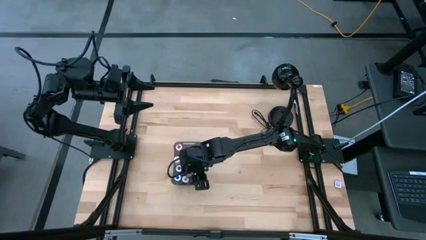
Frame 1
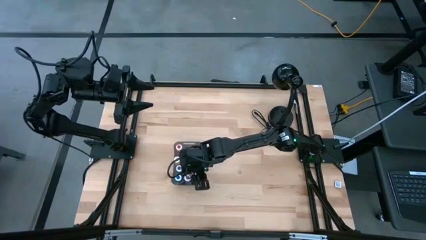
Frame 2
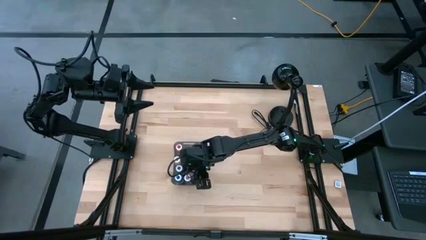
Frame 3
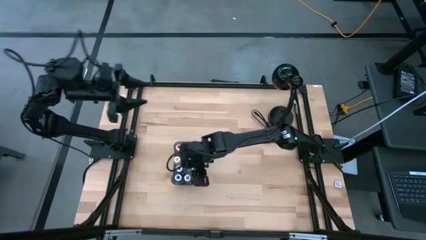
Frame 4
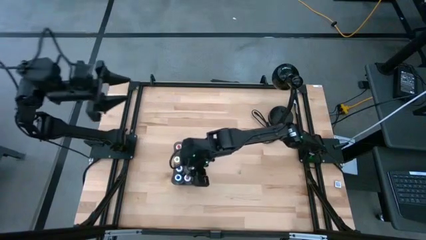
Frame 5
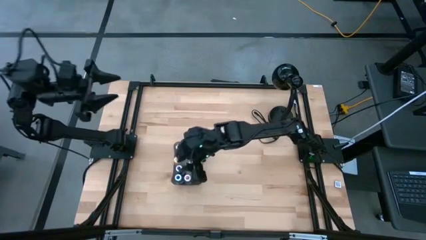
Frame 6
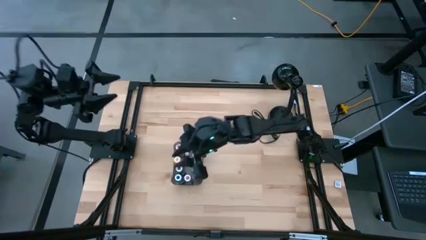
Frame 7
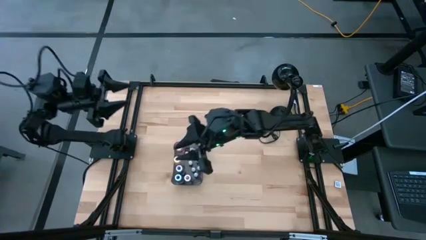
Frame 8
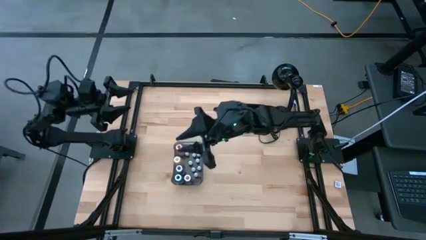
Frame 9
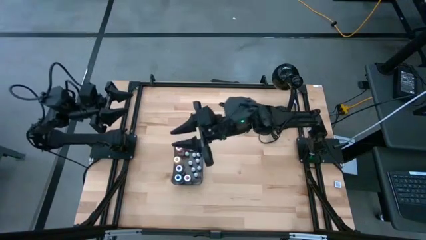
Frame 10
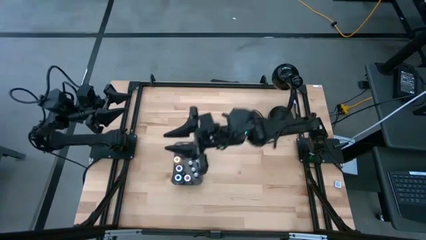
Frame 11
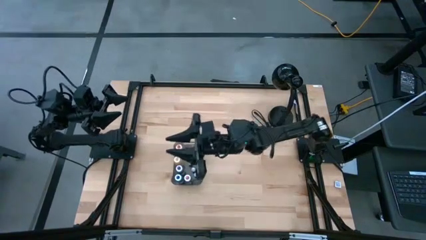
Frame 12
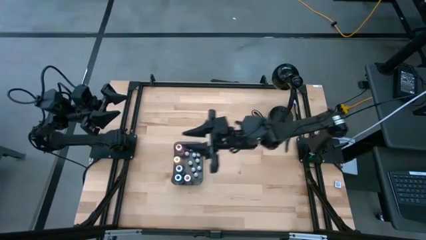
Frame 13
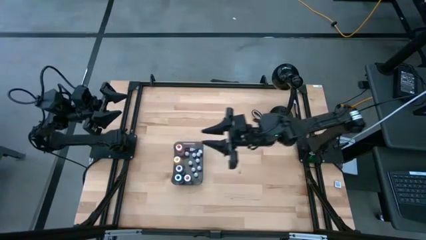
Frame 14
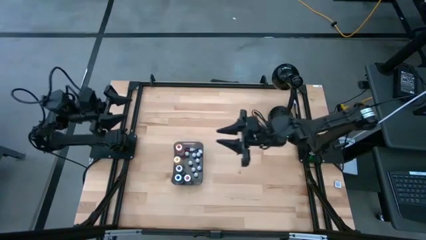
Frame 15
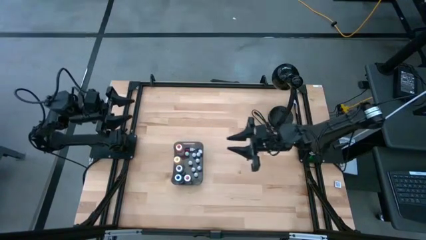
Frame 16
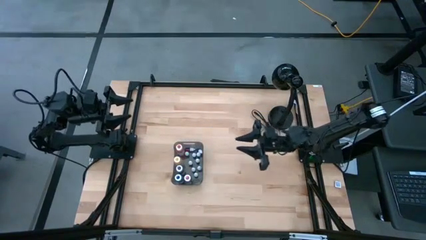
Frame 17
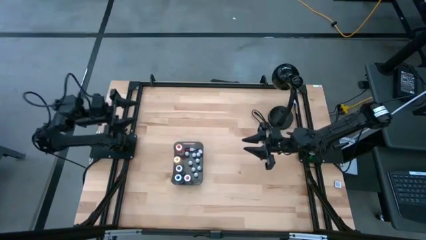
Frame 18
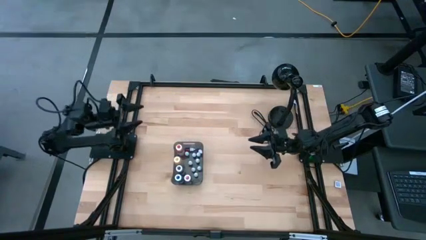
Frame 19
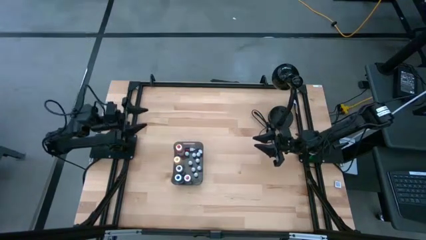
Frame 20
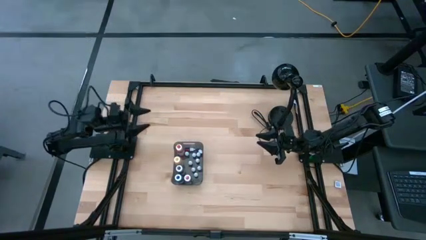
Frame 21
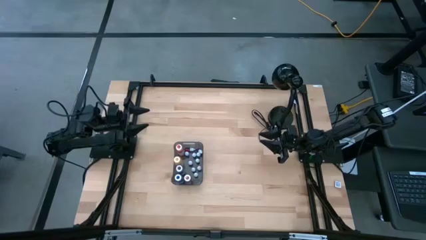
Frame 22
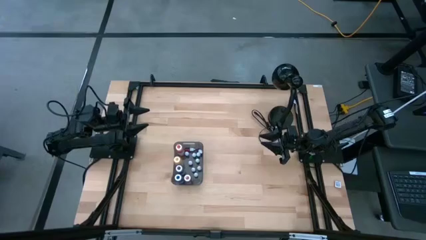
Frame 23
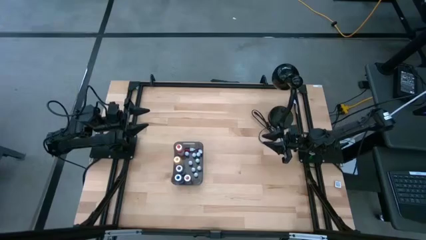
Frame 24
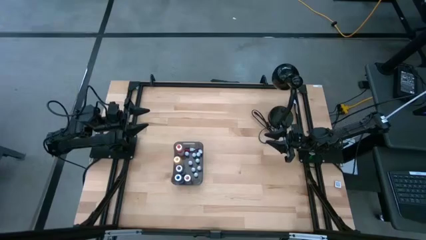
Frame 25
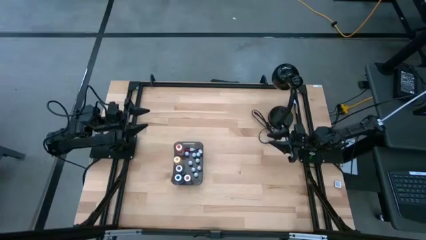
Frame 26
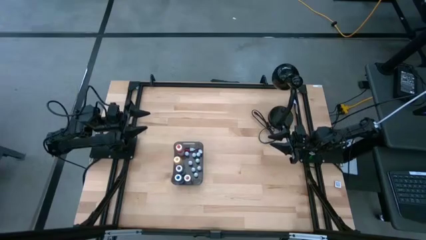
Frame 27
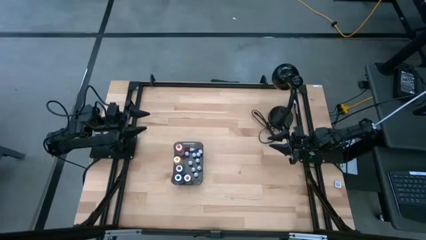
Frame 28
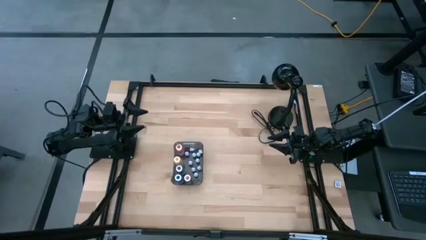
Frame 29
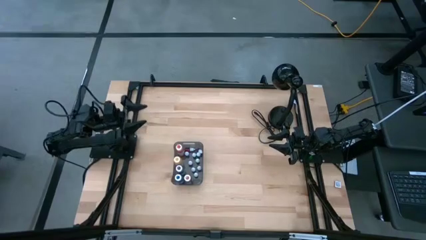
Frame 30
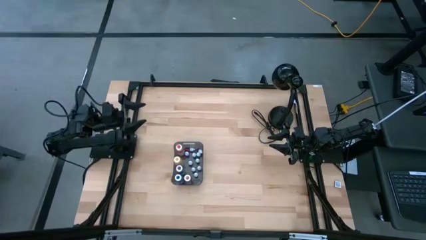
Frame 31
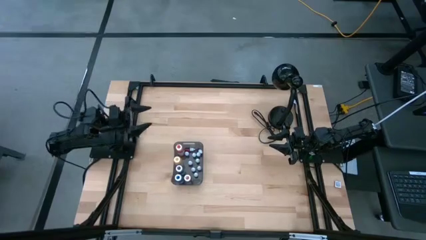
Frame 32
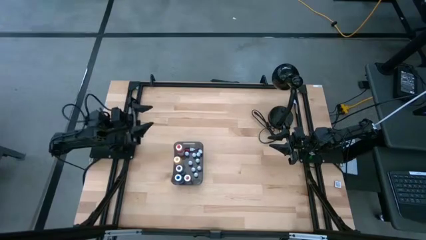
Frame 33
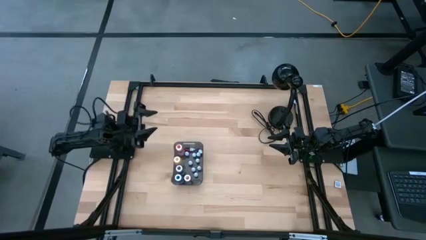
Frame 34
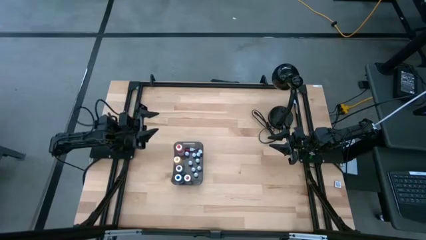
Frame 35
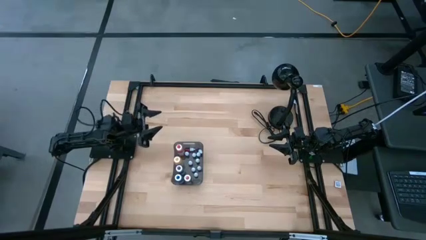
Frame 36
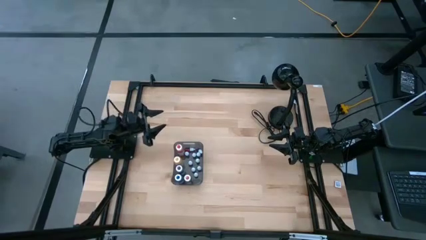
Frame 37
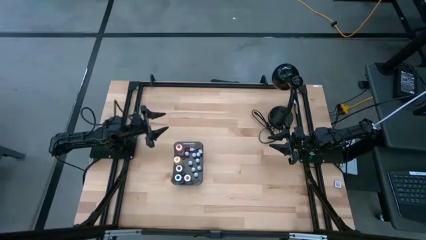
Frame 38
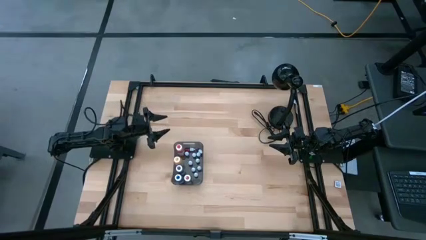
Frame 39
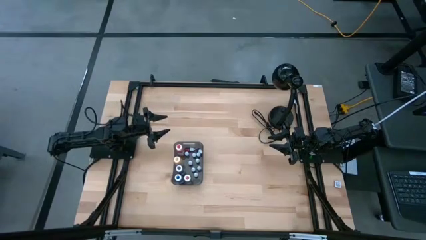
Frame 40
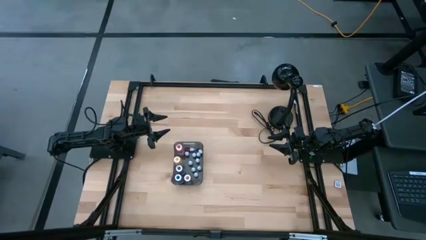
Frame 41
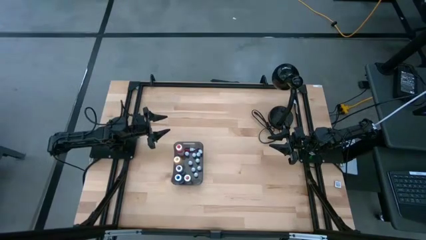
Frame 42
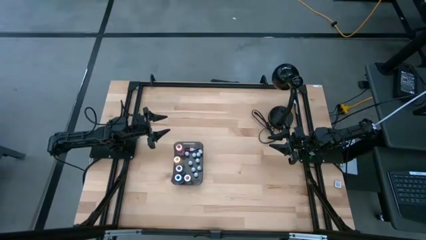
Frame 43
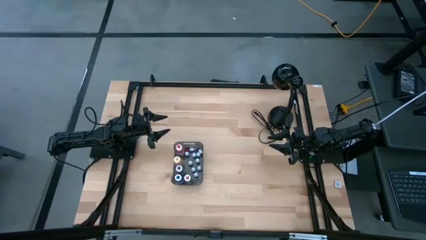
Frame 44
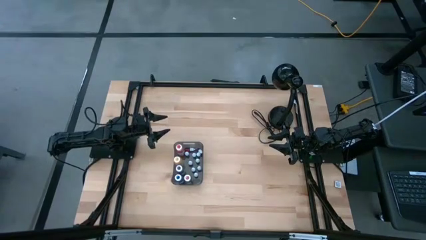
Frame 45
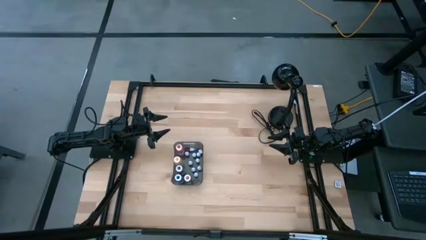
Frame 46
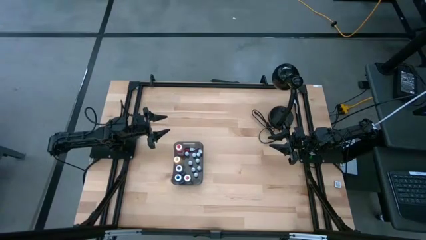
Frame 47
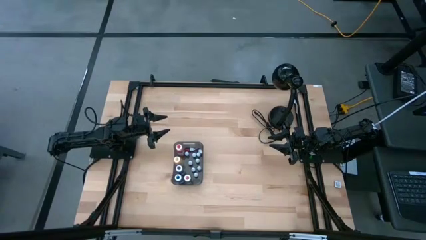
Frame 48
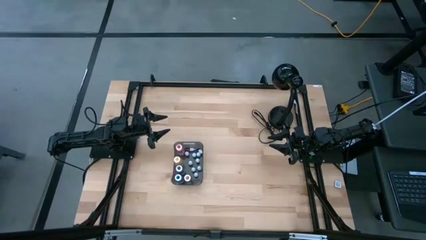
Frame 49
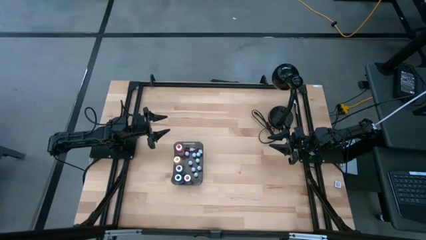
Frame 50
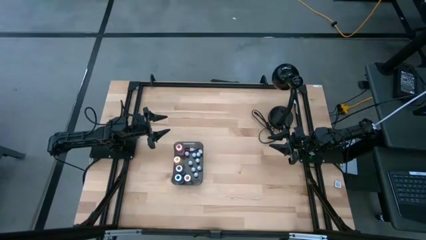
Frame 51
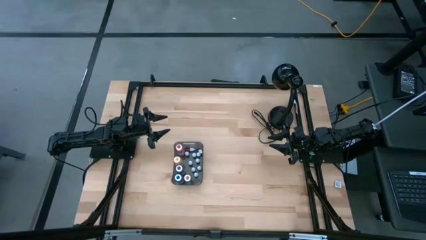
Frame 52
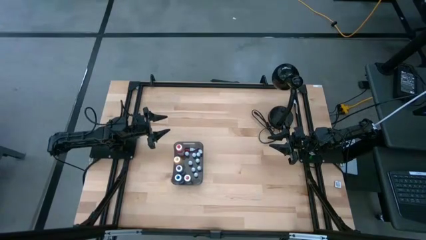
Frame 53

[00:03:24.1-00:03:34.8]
Task: Pick & Place food coloring
Return to Home Position
